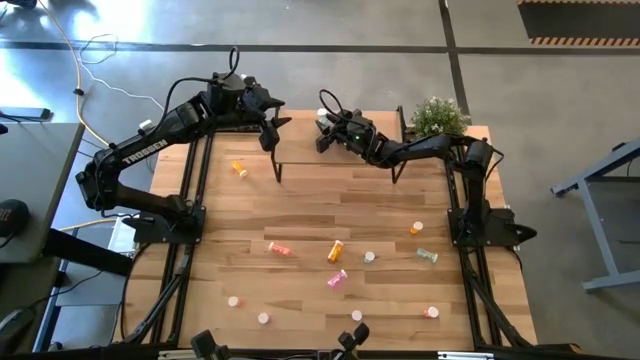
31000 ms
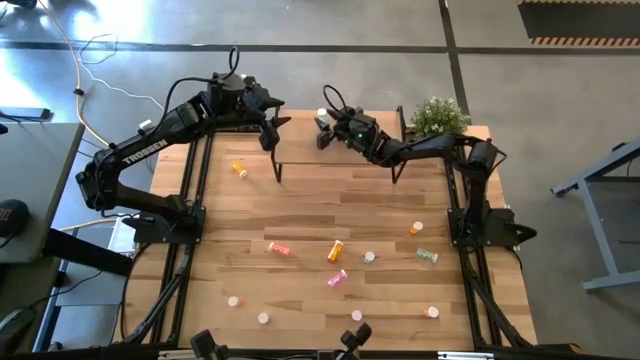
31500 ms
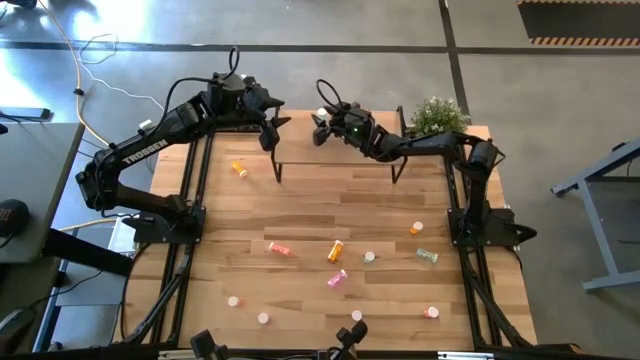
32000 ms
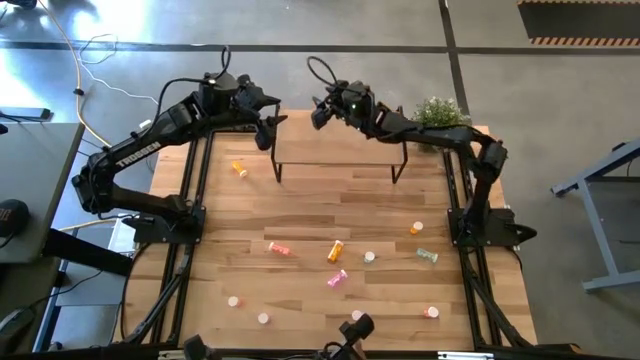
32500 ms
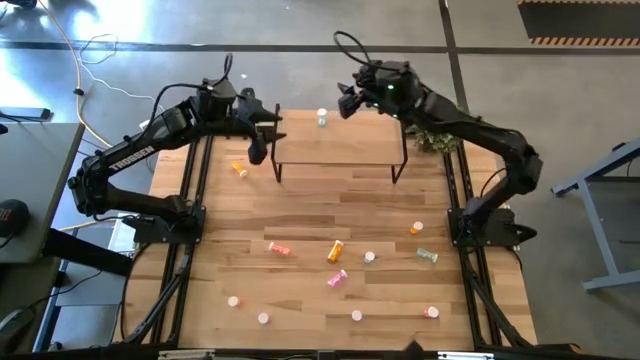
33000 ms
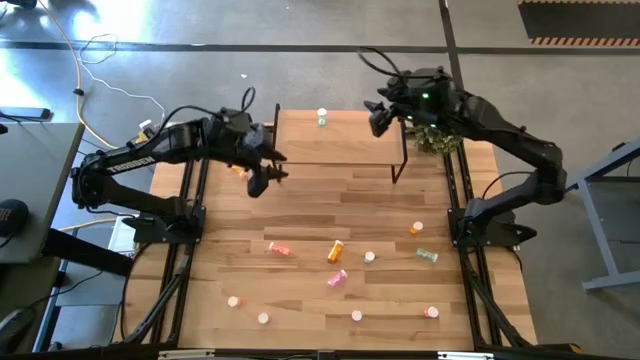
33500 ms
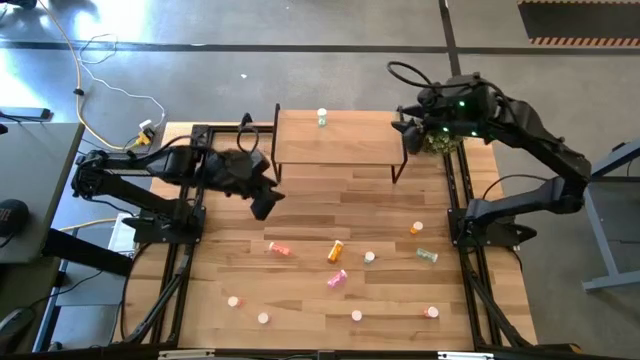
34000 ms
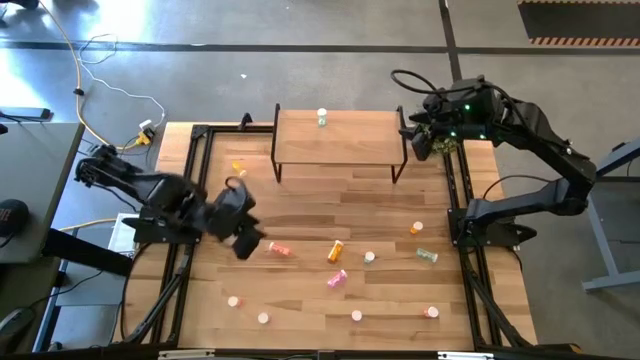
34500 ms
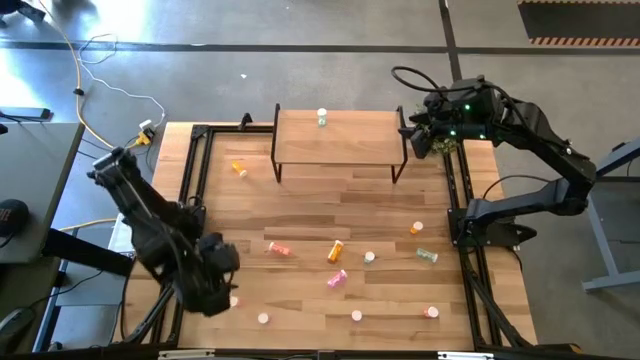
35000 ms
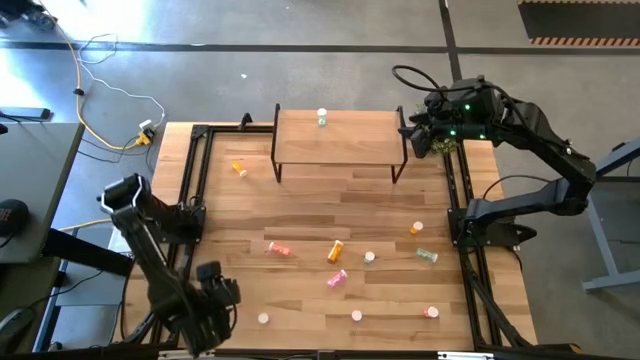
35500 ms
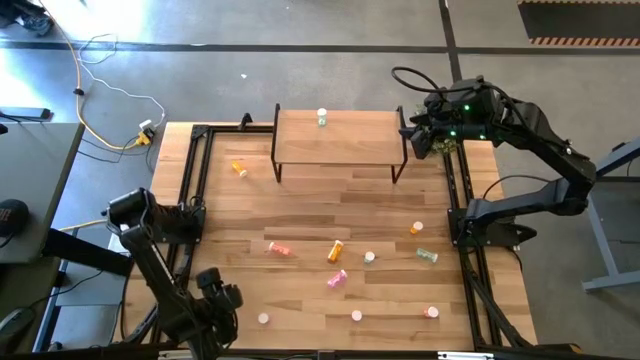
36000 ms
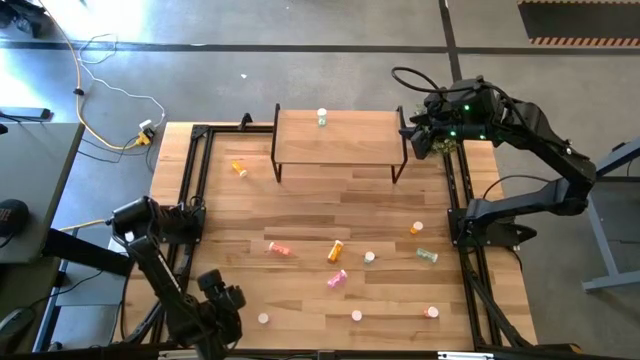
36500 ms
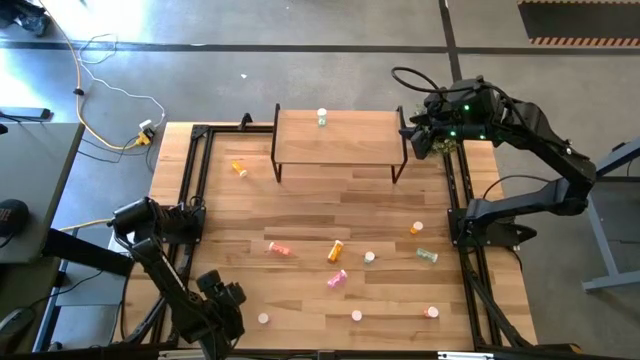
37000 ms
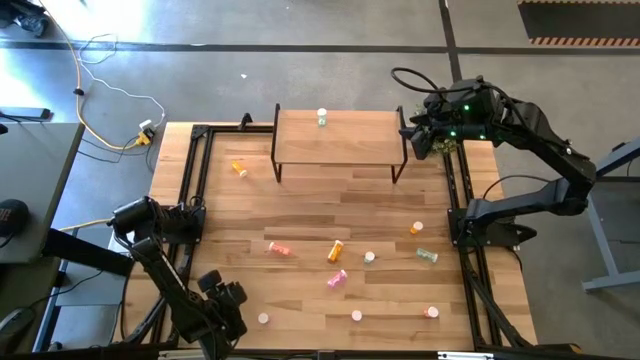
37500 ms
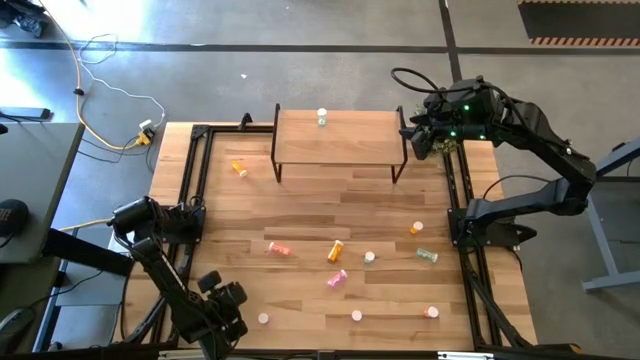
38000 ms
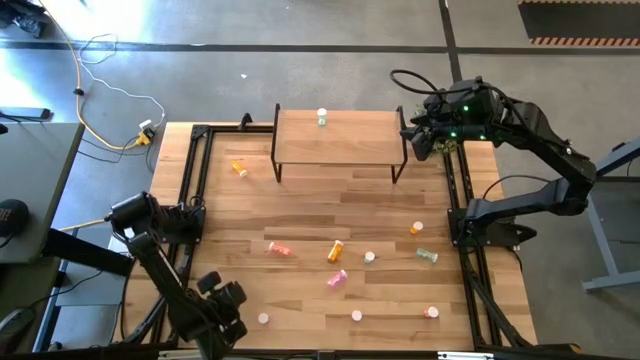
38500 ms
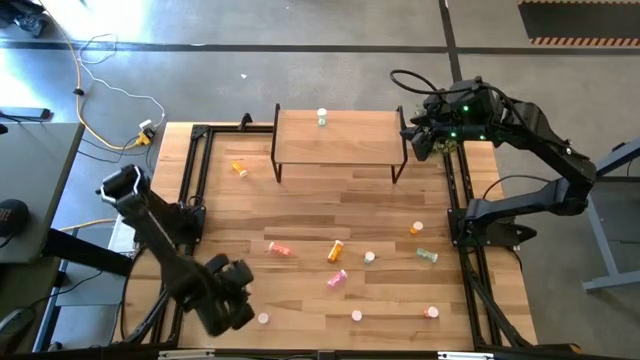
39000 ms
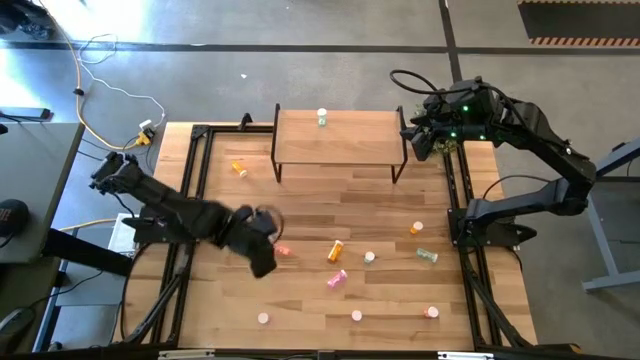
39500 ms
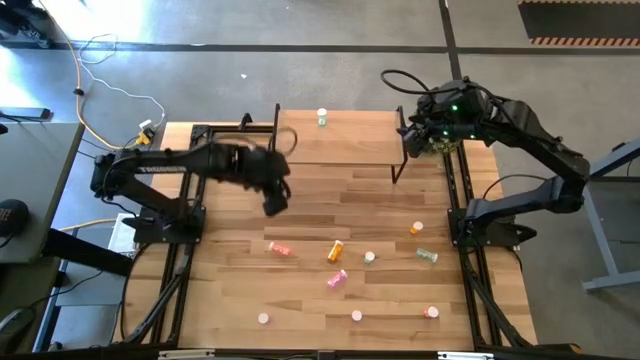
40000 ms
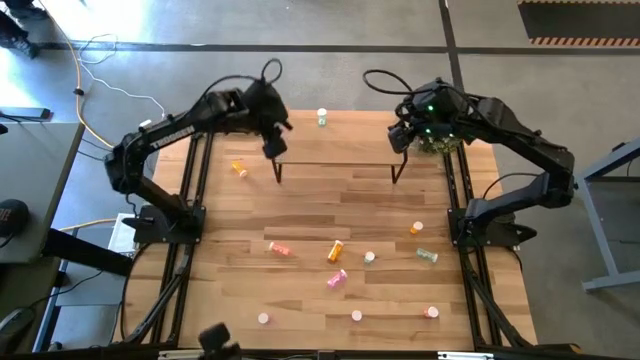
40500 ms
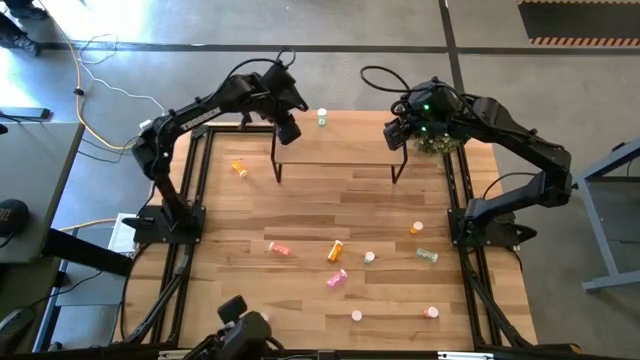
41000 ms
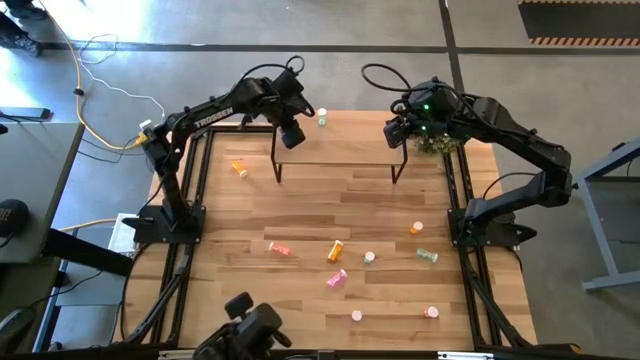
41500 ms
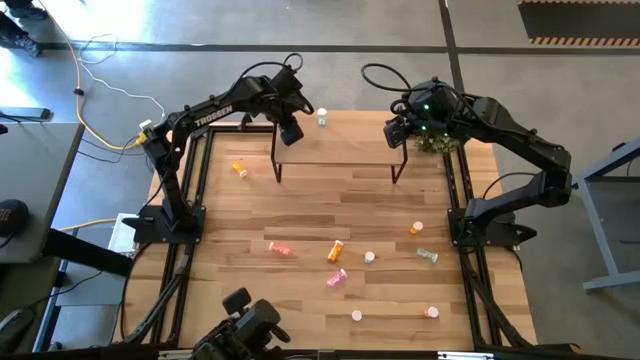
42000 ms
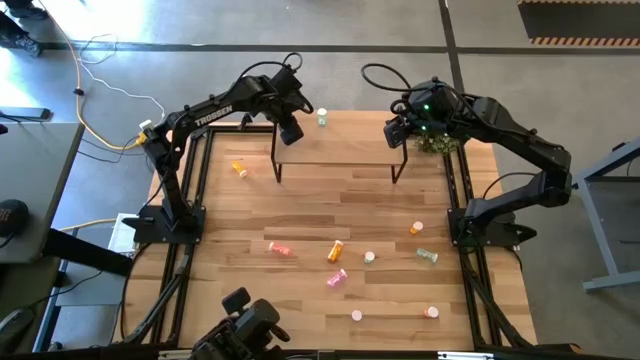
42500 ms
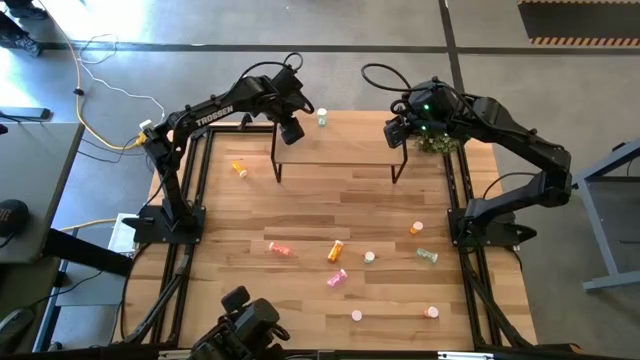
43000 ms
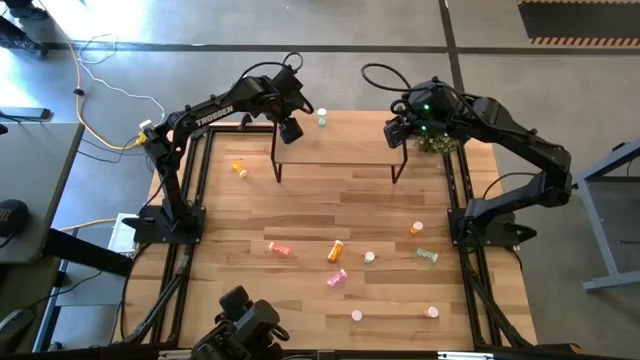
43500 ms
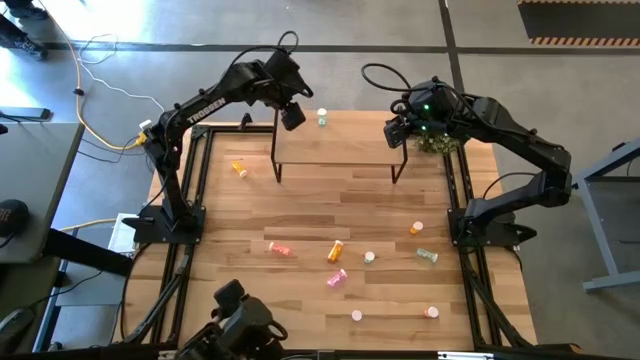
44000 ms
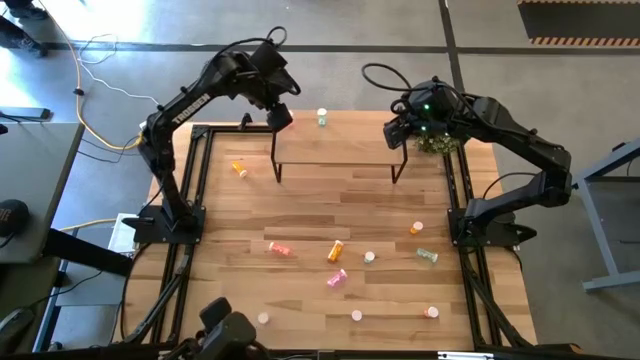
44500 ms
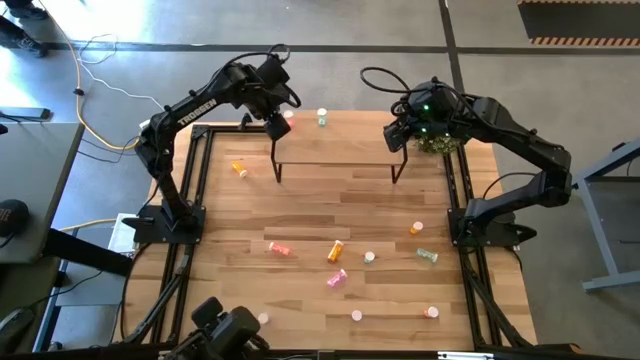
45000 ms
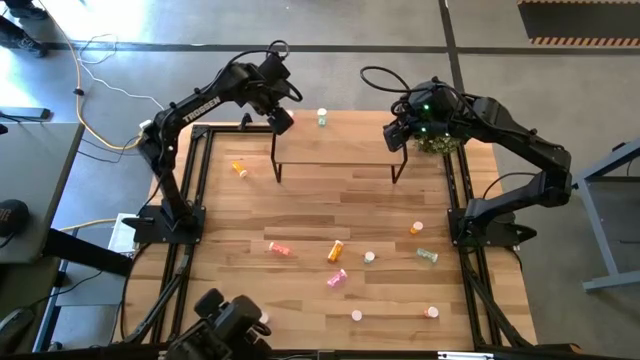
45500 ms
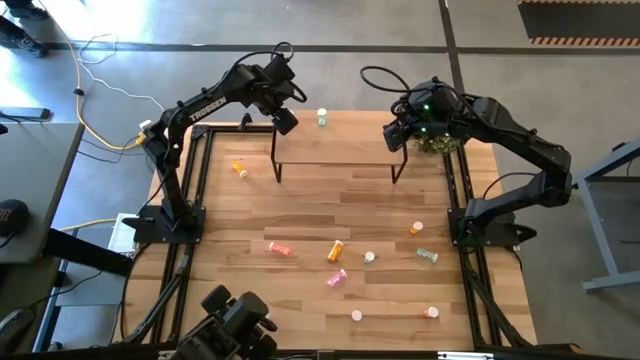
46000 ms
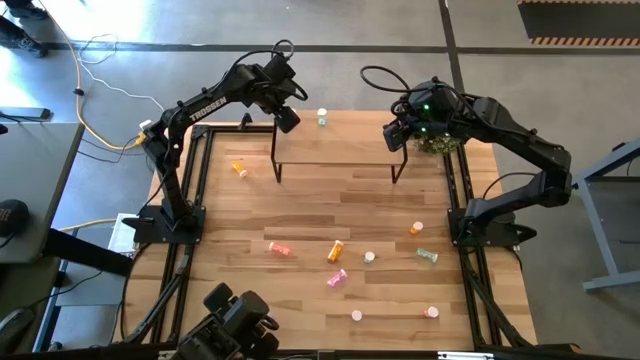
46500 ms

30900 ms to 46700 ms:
Task: Pick and place medicine bottles onto shelf by color
Put the bottom left pink pill bottle on the shelf

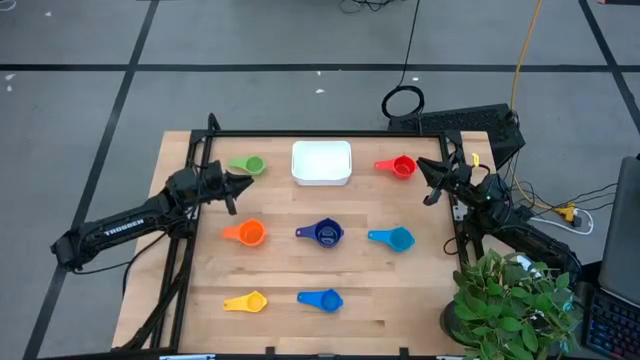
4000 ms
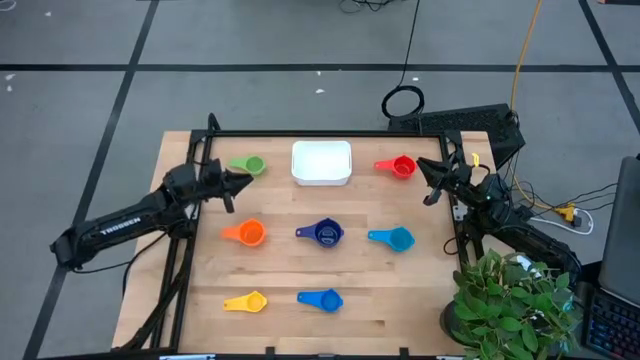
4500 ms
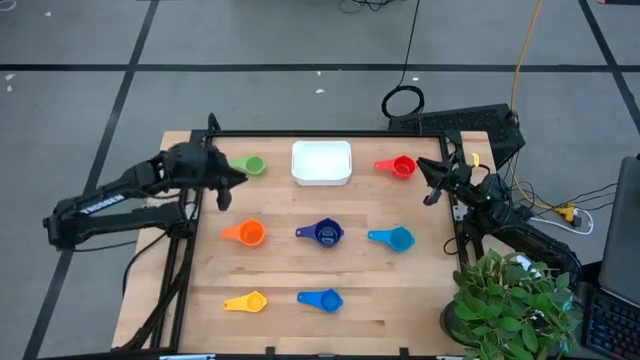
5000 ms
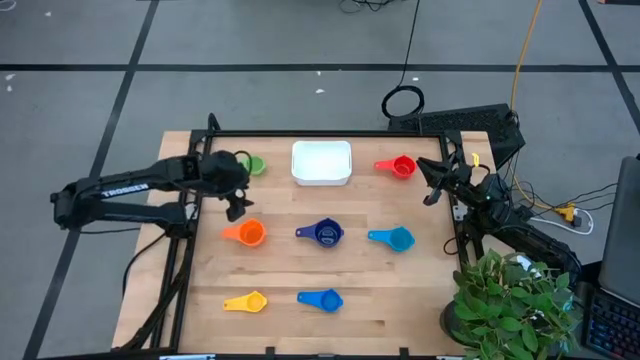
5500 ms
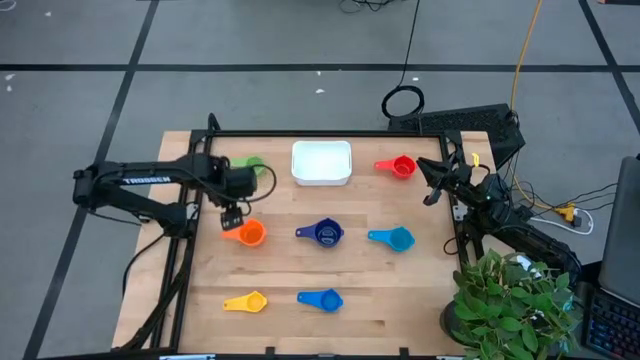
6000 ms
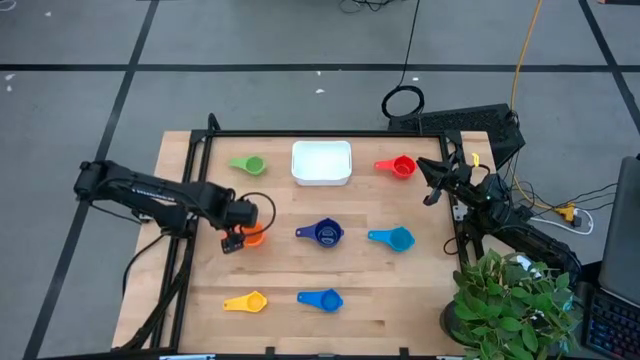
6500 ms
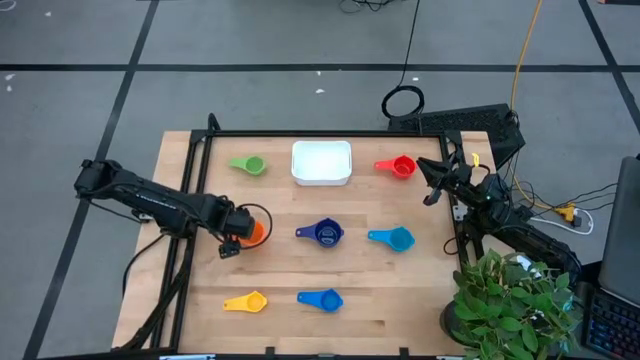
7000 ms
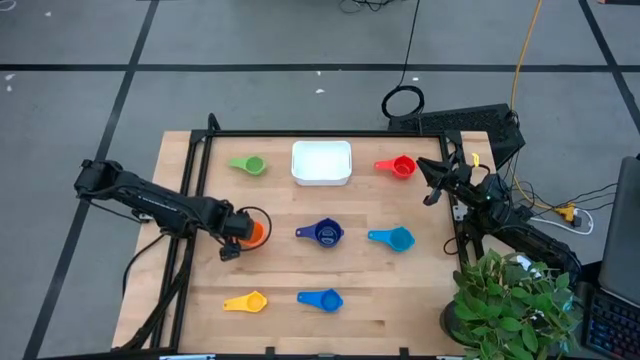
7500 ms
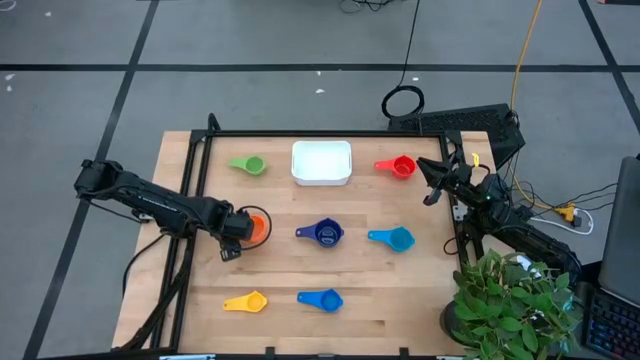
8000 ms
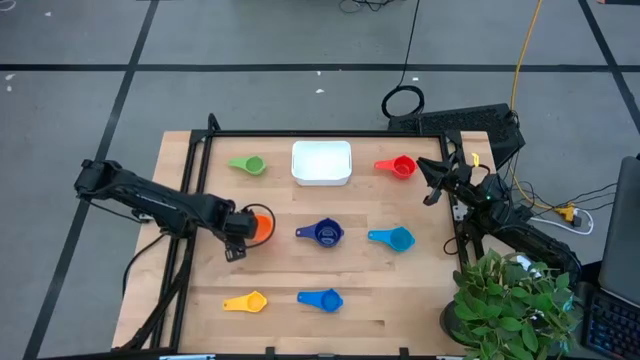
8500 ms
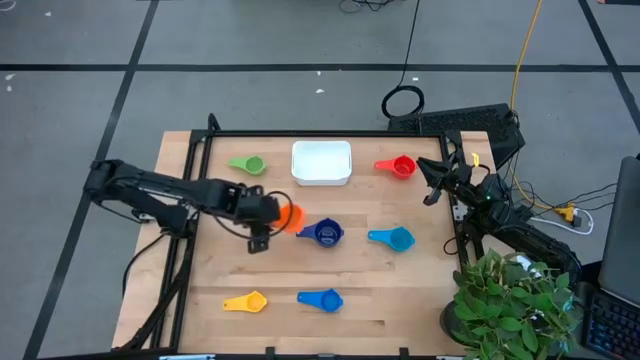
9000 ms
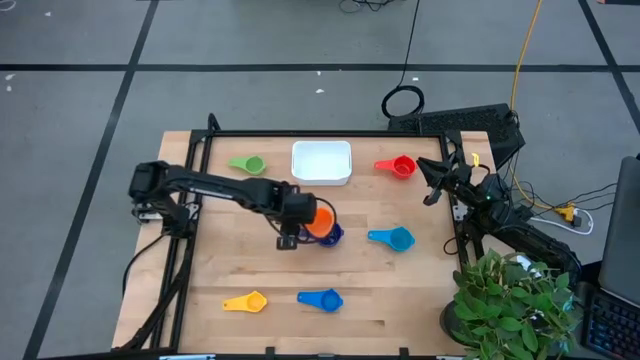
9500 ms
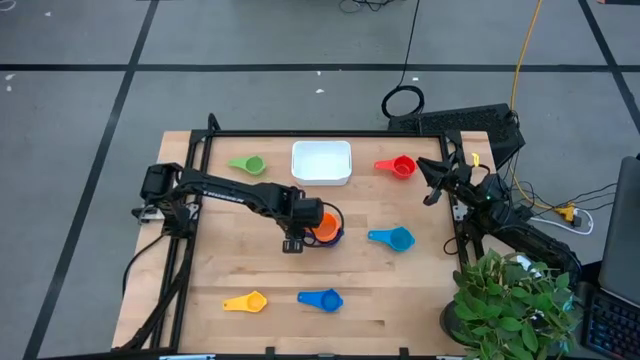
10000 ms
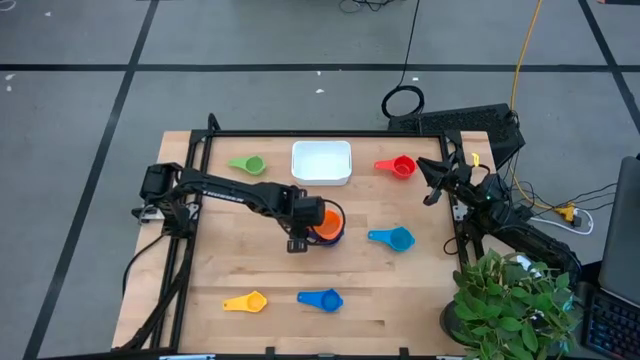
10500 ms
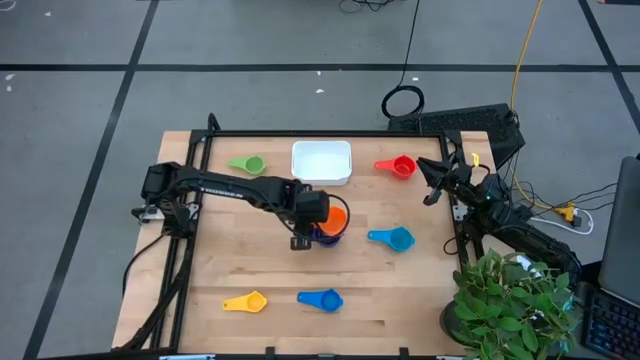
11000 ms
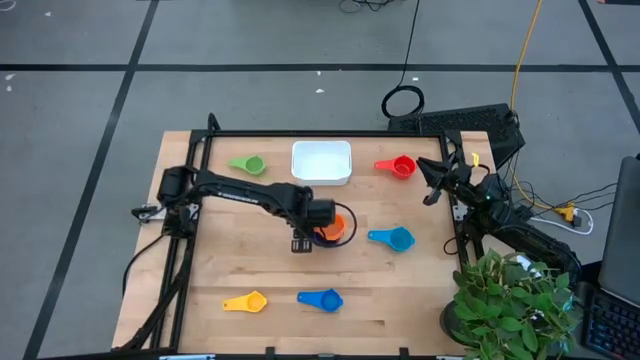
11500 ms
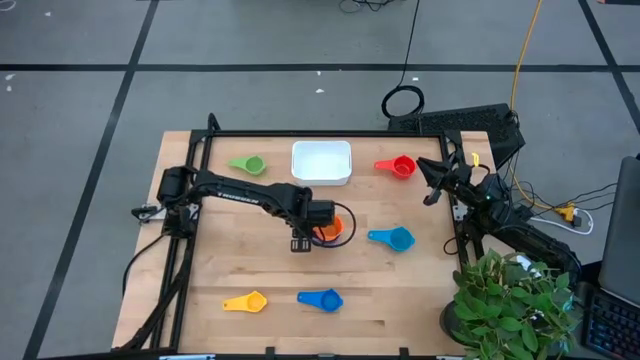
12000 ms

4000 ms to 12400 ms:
Task: Nest measuring cups in basket
Stack the orange measuring cup on the dark blue measuring cup
